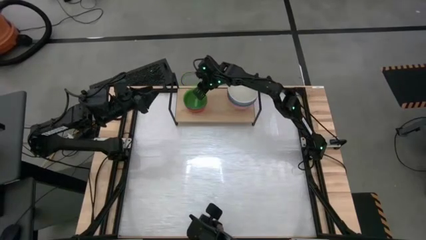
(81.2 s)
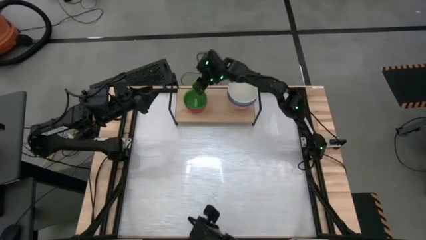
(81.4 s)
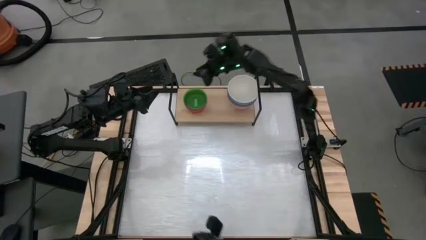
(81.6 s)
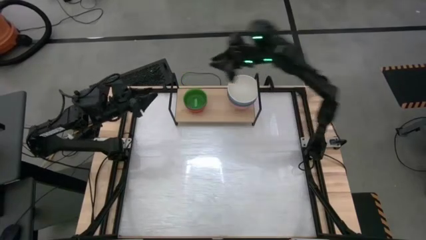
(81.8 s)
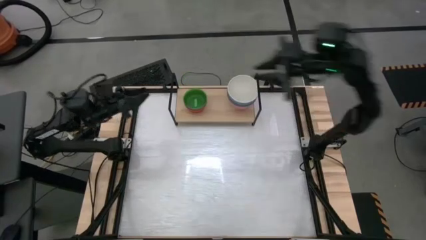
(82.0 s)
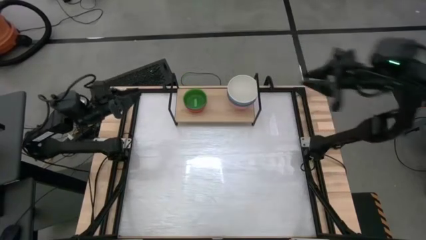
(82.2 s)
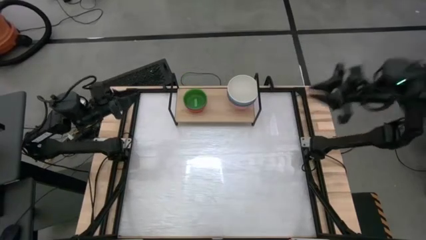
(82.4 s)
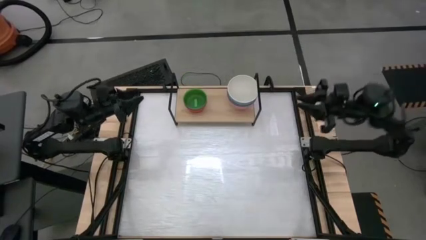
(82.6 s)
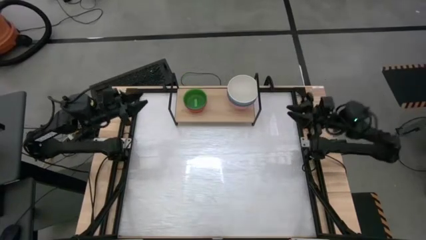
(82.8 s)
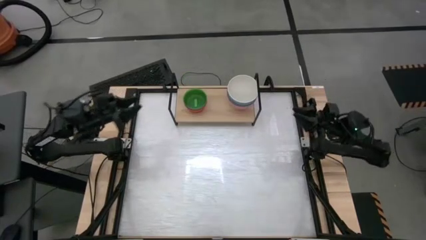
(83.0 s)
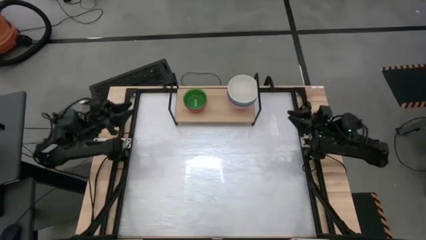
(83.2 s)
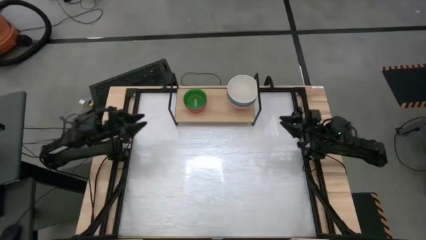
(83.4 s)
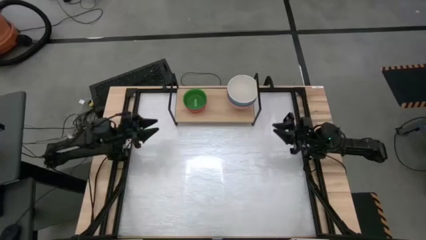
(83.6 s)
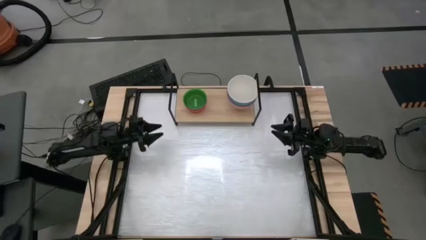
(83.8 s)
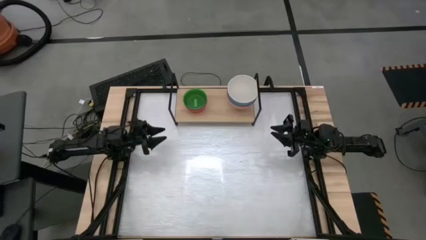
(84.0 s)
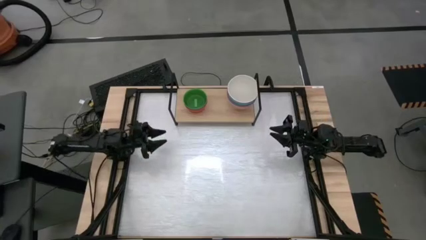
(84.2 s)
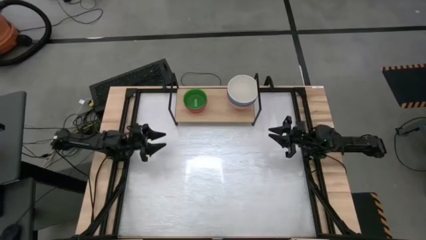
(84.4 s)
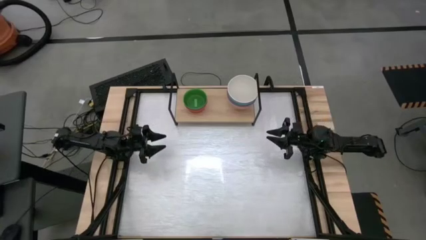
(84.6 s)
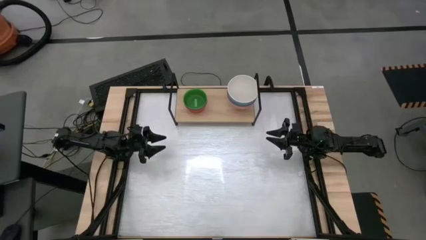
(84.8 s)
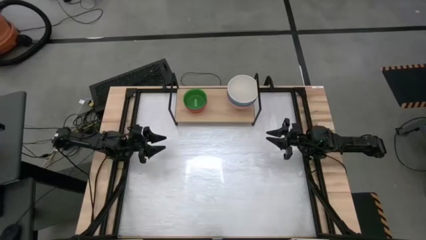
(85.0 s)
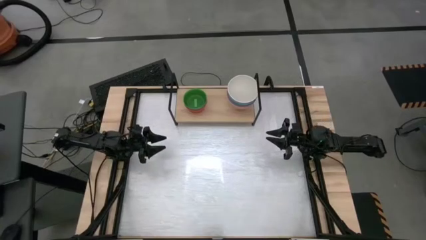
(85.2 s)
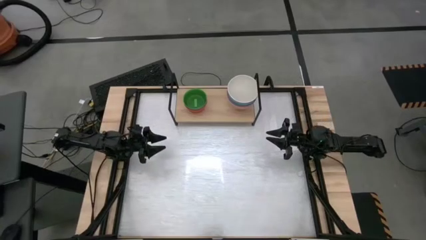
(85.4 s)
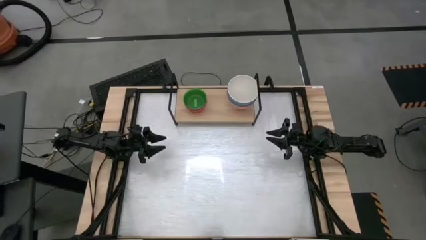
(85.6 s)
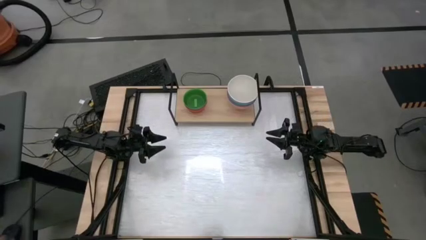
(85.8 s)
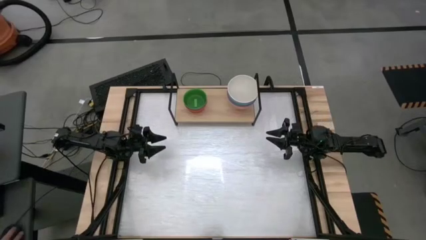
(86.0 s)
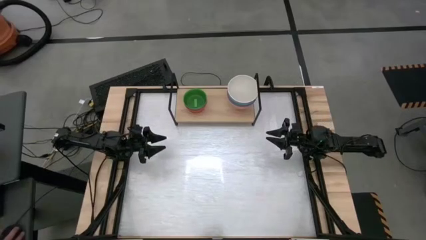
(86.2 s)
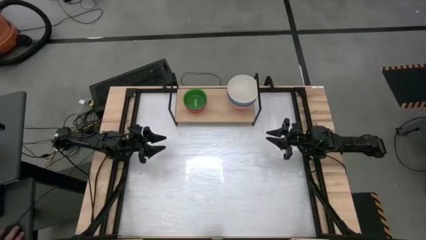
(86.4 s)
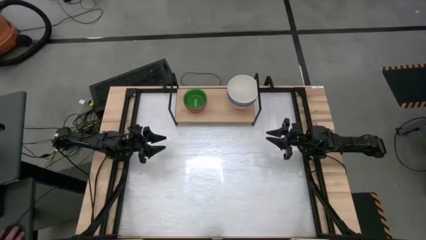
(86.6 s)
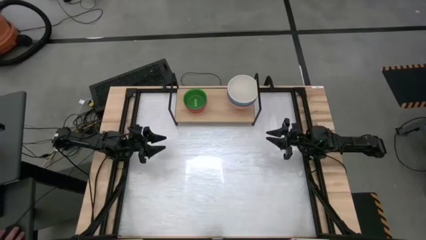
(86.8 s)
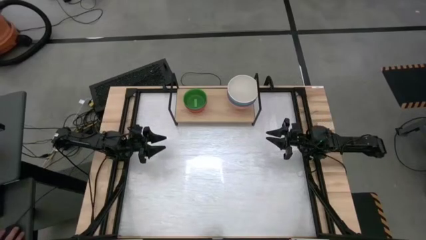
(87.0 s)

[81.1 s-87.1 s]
Task: Place and stack bowls onto a shelf
Return to Home Position

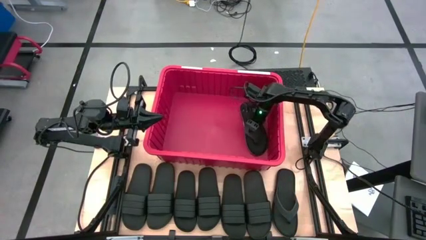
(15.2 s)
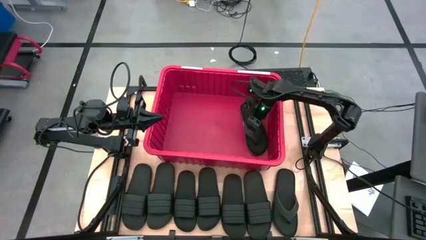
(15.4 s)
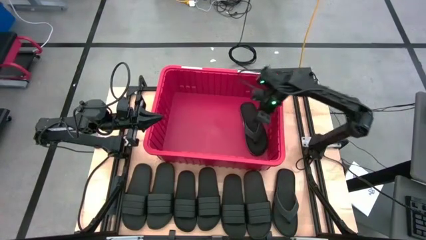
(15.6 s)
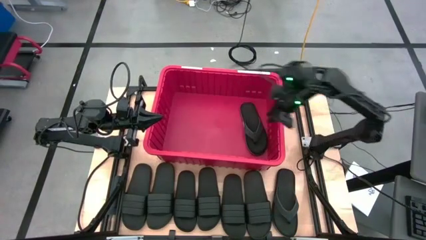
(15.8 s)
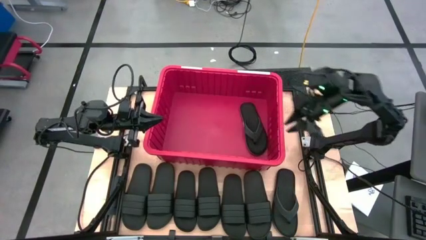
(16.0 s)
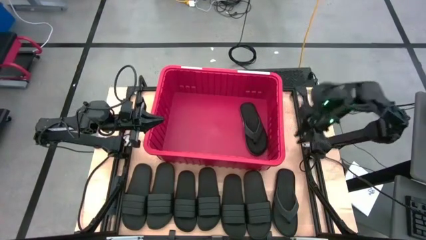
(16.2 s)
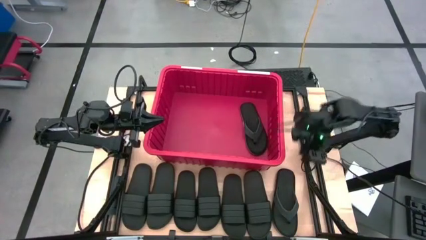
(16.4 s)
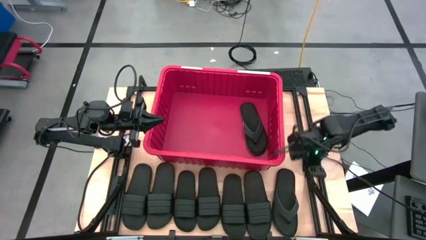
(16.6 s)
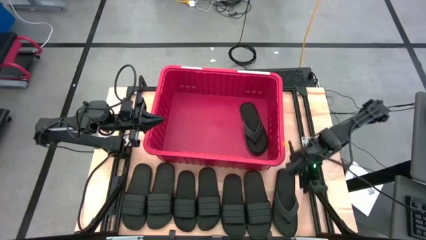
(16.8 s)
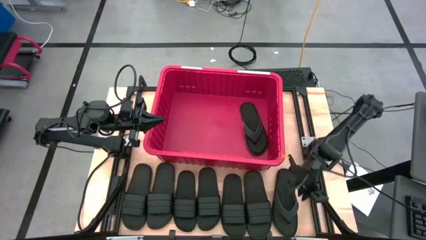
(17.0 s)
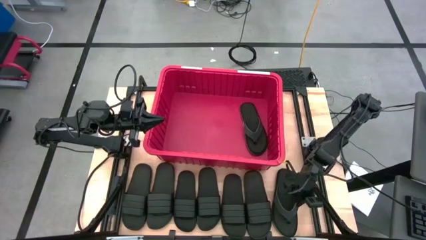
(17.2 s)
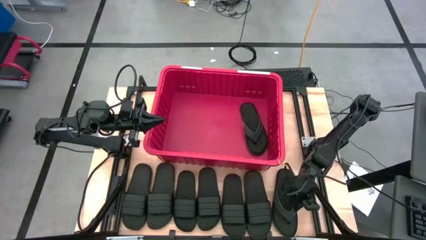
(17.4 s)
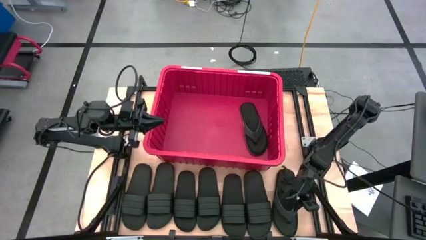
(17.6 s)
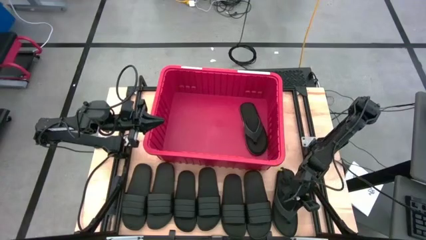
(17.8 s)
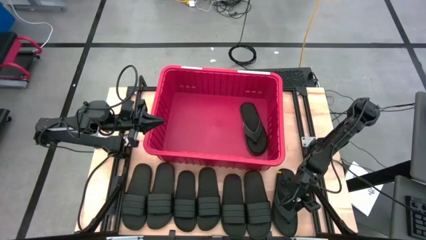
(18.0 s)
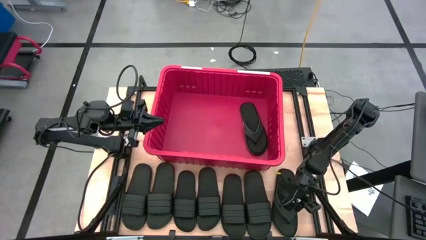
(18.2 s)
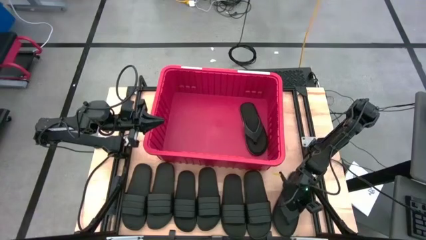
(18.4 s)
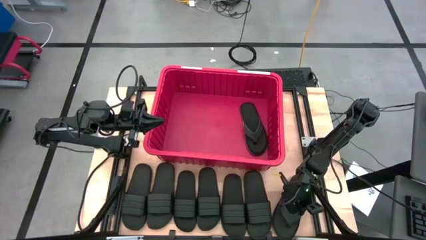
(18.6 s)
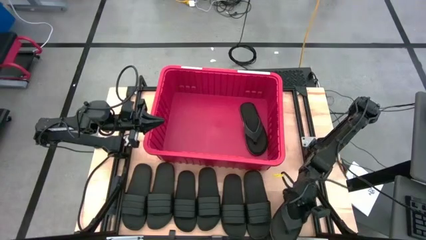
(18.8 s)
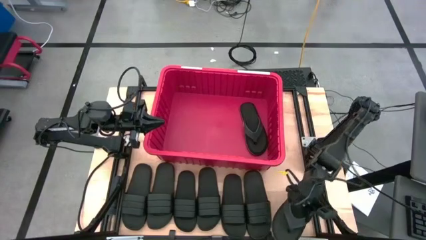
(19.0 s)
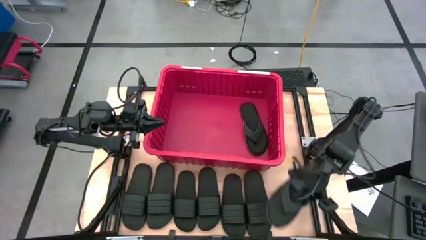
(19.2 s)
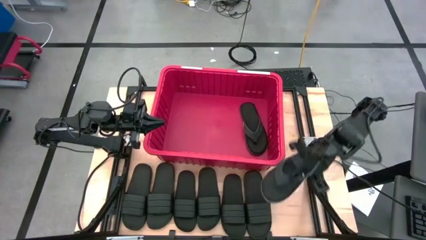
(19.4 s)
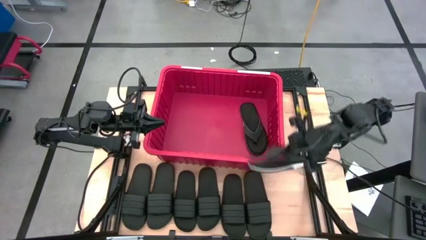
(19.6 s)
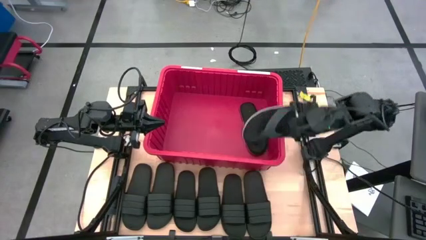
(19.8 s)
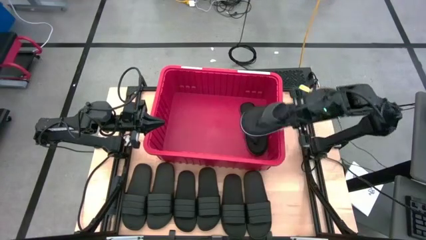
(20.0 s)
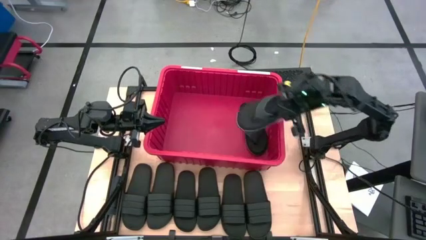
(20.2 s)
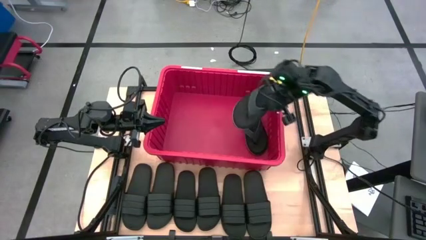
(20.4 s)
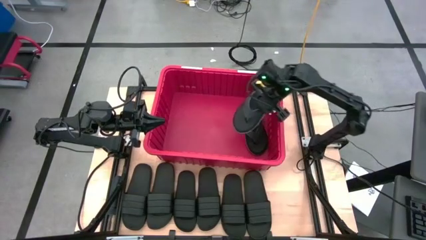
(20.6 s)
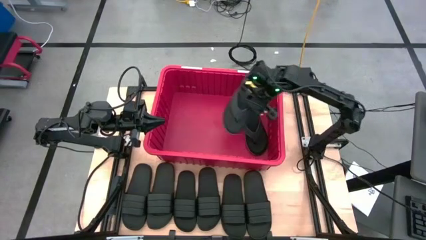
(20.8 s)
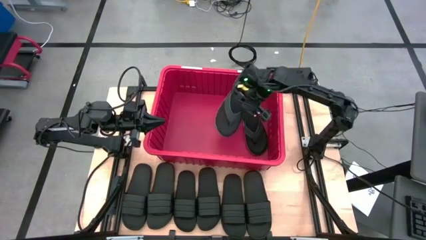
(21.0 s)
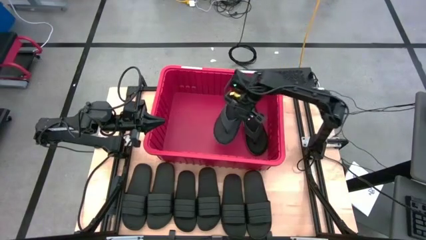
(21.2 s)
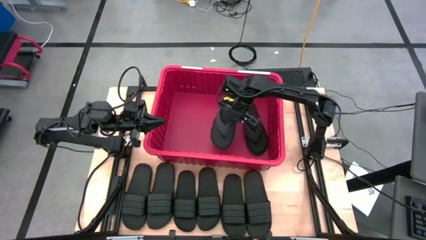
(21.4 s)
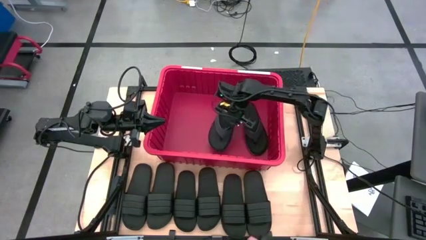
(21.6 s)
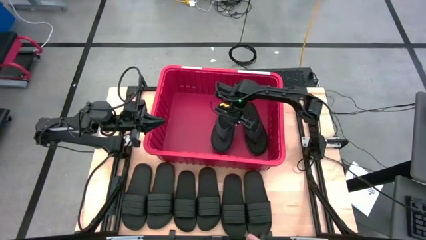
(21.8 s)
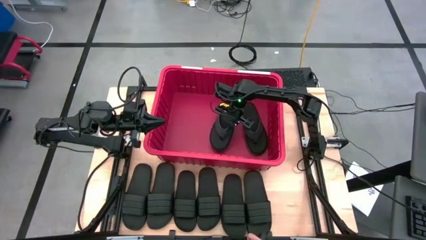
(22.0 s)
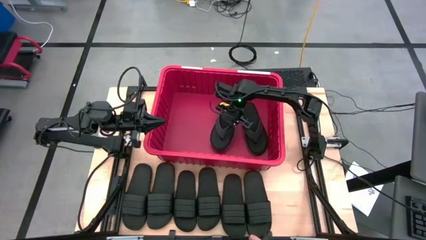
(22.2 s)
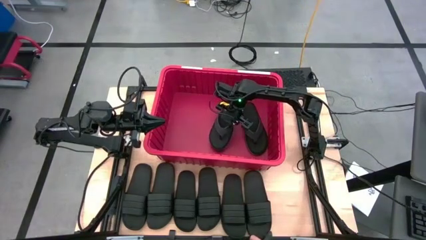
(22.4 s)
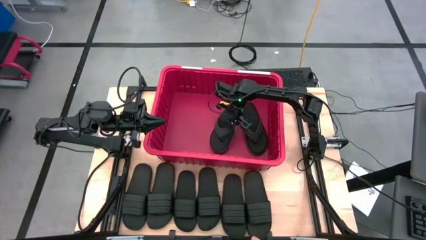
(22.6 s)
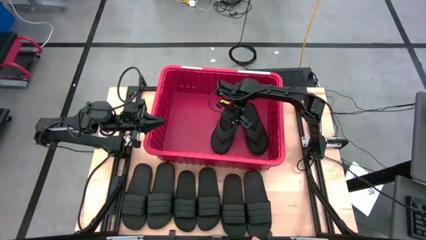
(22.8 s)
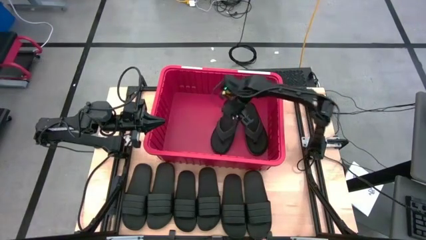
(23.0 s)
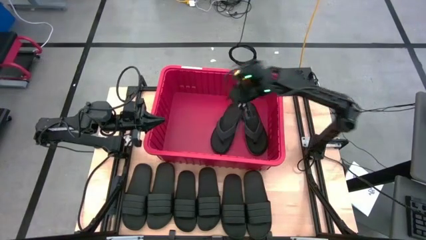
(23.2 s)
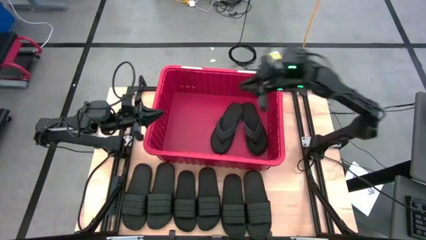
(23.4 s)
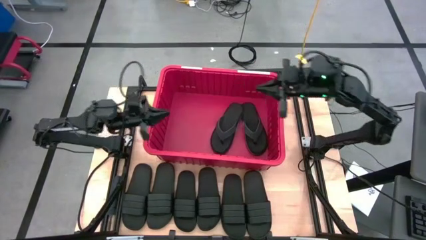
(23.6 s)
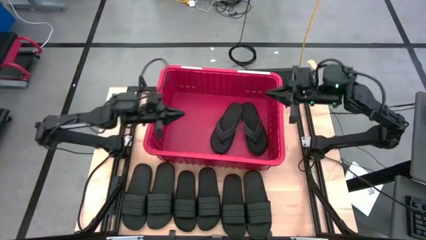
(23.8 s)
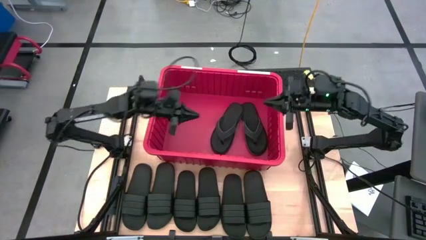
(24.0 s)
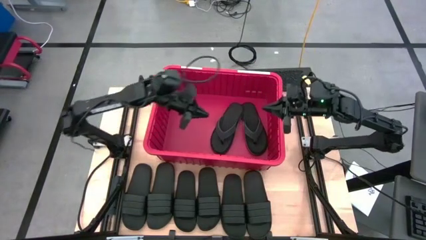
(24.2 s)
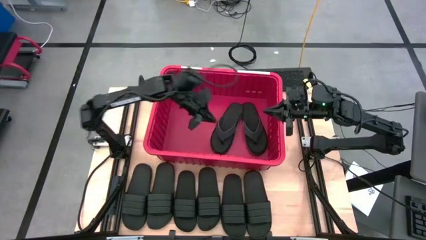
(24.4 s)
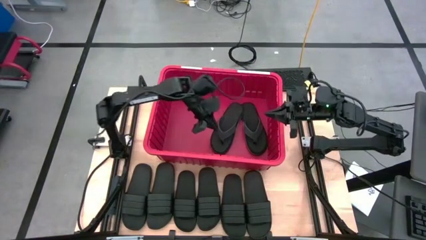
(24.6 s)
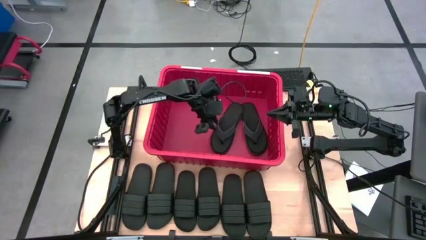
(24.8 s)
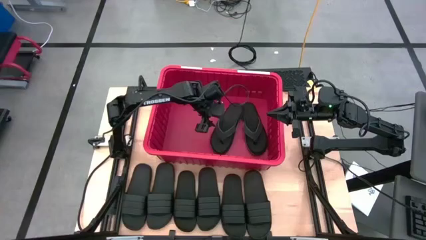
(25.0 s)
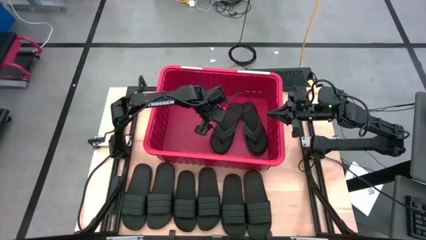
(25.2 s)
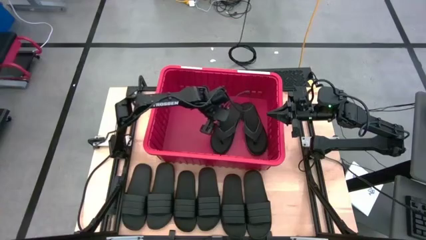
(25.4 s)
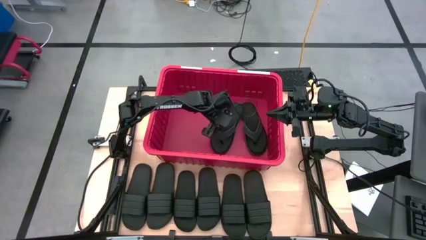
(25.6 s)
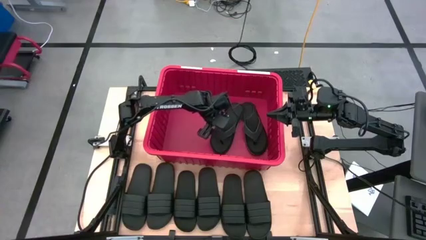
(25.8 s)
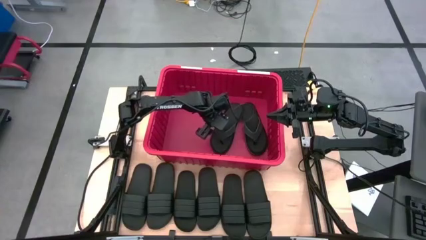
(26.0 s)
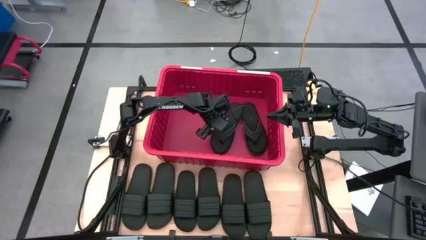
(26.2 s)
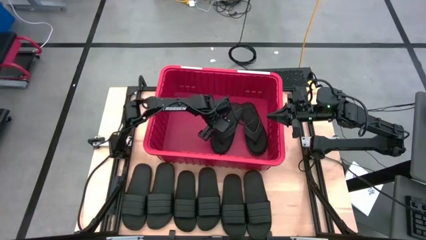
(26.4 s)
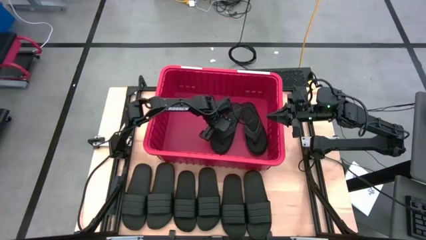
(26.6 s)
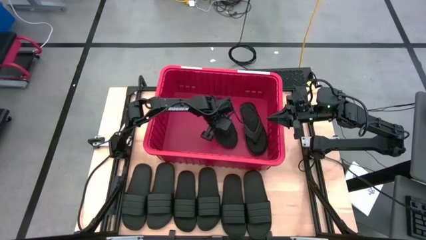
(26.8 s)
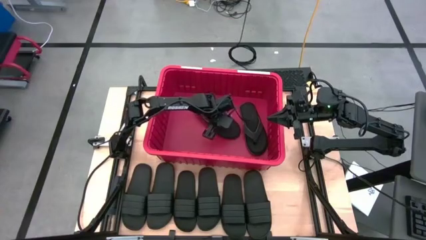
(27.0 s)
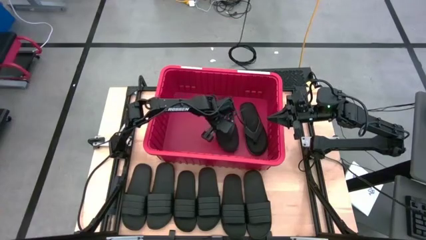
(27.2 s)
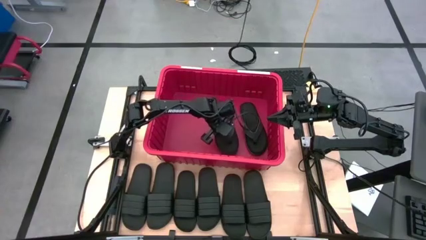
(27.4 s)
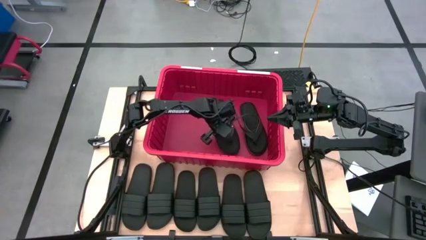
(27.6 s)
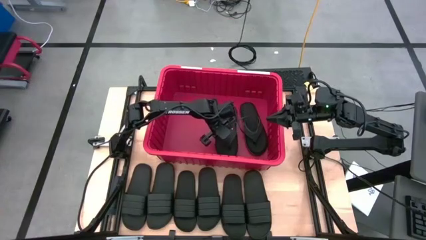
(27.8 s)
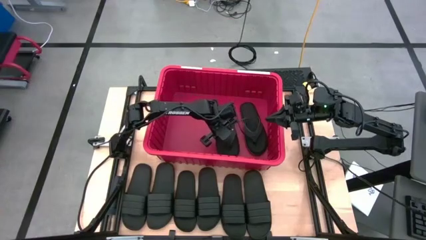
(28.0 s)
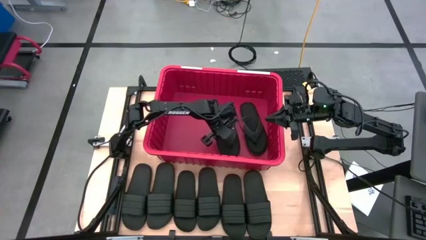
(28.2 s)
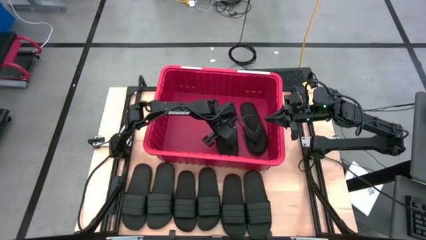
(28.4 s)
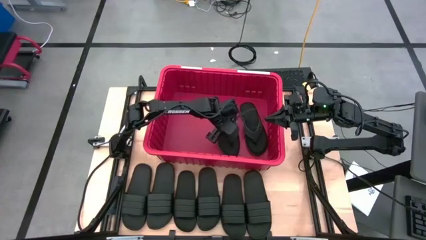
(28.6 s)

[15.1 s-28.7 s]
Task: Pick and place slides into bin
Put the black slipper into the red bin
